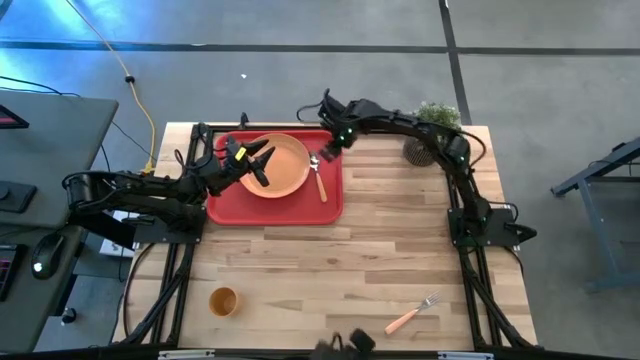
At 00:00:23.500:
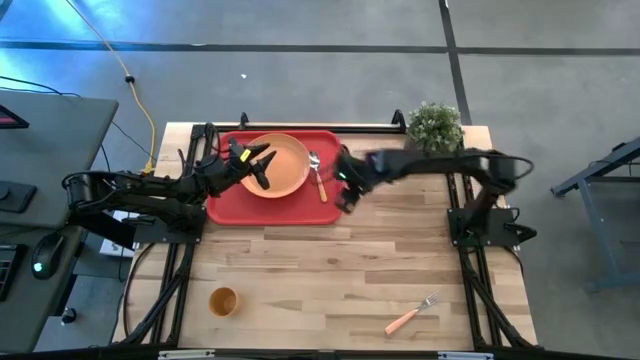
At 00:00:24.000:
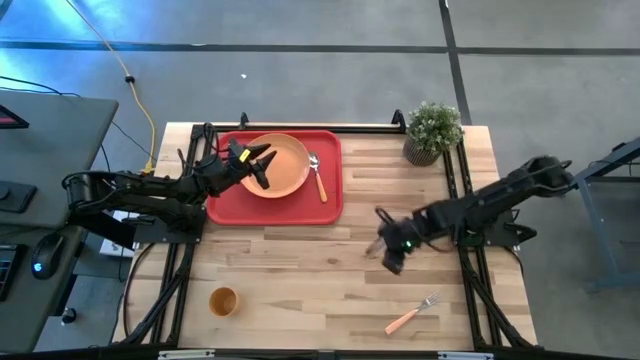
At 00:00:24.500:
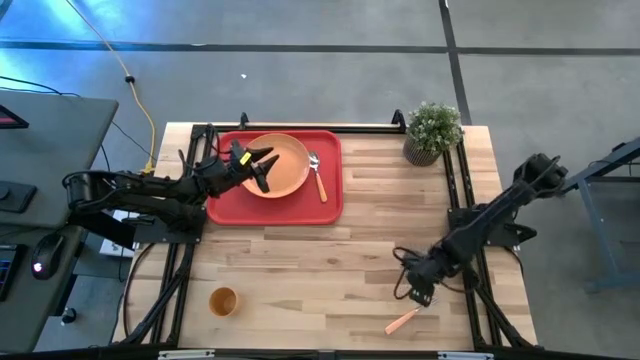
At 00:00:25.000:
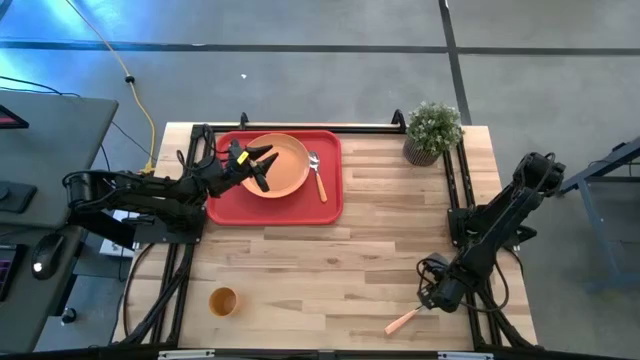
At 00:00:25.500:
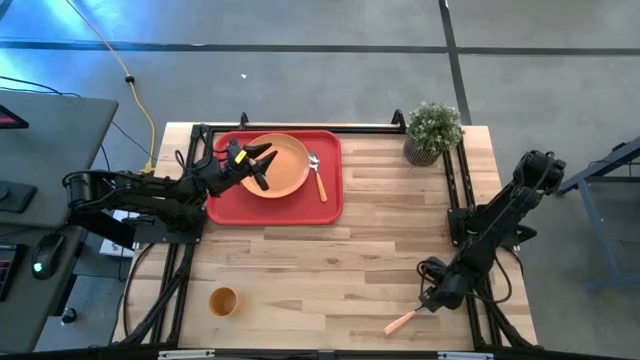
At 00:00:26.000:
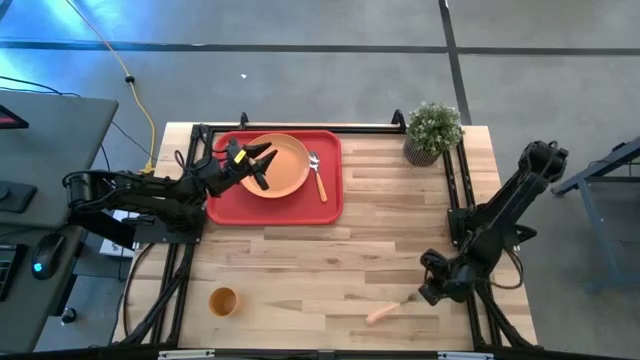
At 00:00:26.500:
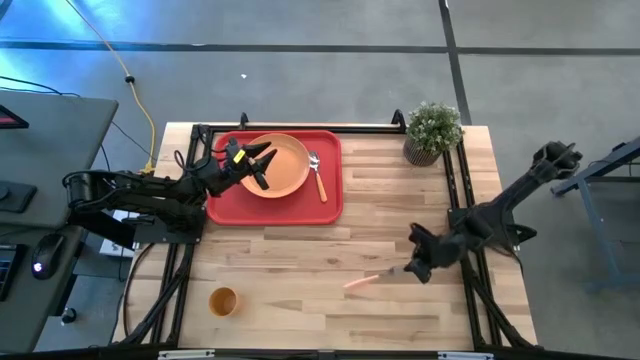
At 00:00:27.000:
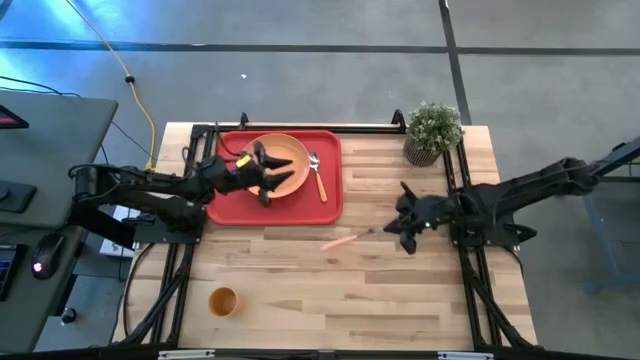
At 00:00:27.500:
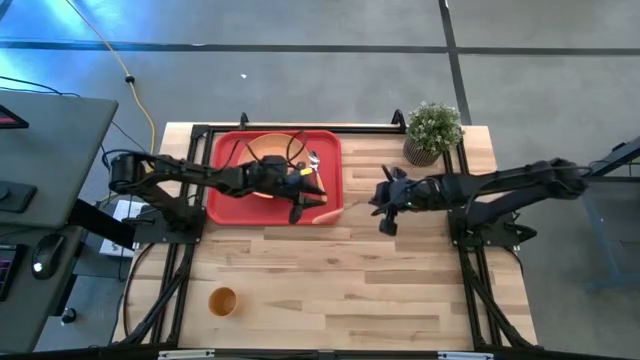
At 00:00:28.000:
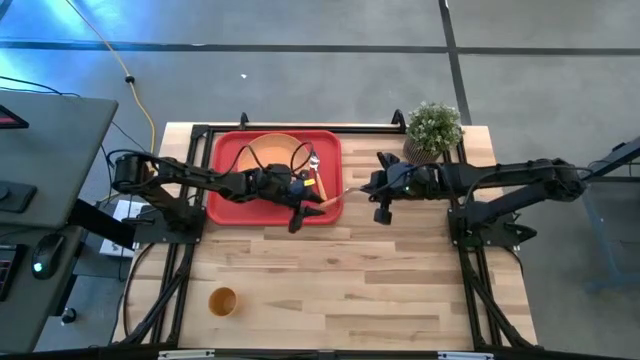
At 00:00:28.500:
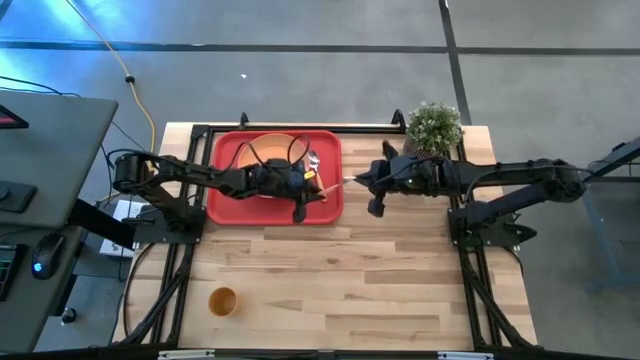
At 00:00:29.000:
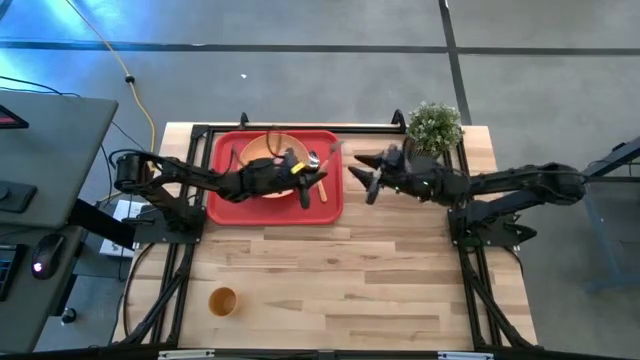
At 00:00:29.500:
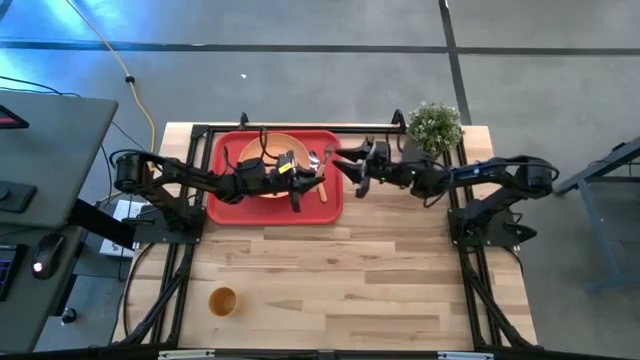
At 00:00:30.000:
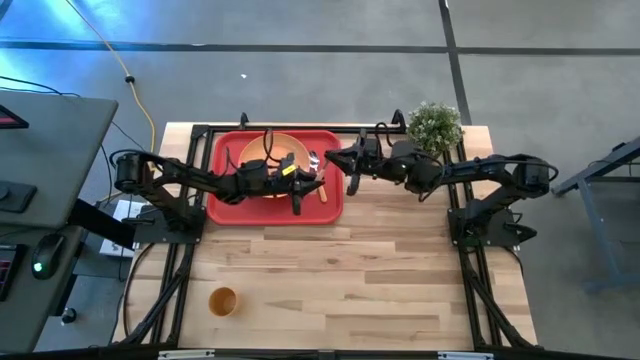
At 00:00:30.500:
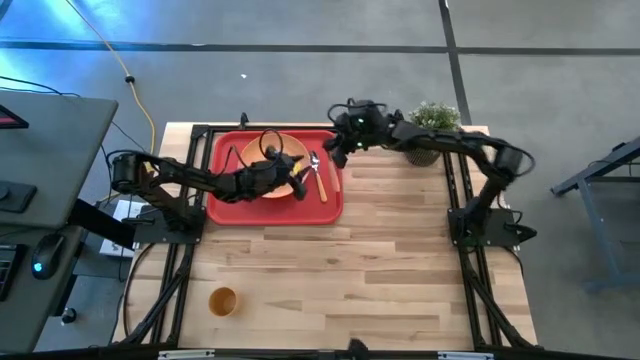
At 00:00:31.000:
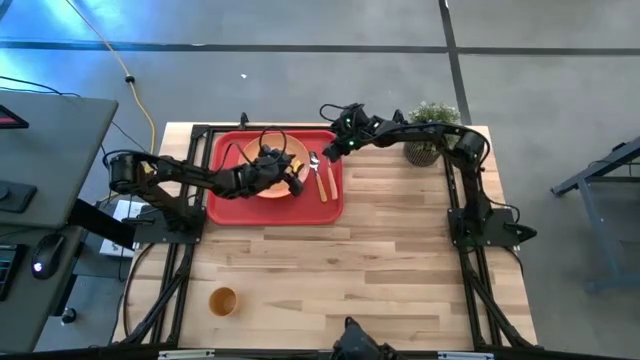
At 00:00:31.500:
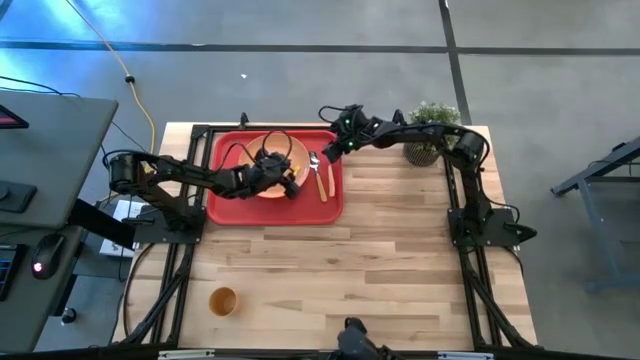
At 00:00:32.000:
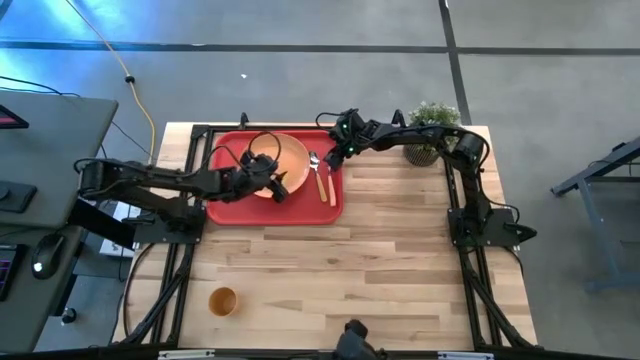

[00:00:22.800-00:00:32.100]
Task: Pick and place plate/cup/fork/spoon on tray
Put the orange fork on the red tray to the right of the yellow spoon

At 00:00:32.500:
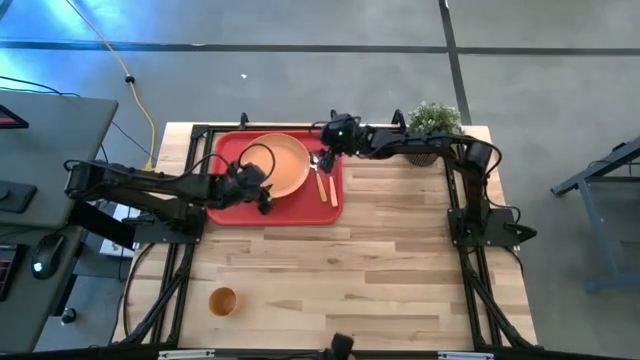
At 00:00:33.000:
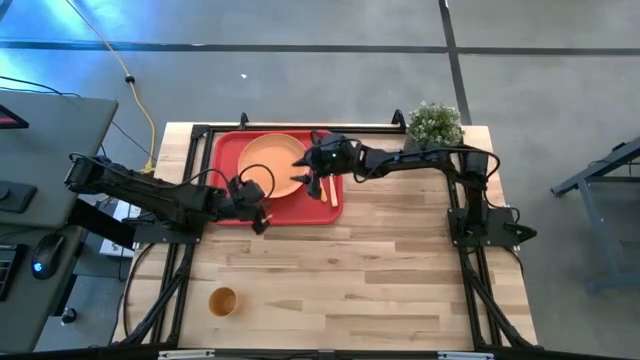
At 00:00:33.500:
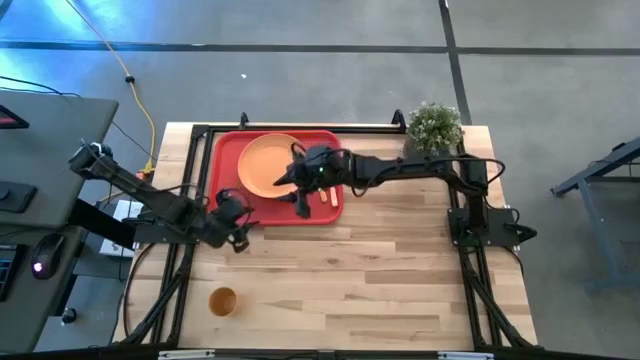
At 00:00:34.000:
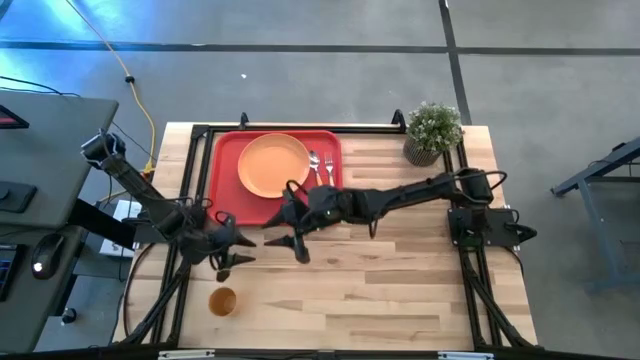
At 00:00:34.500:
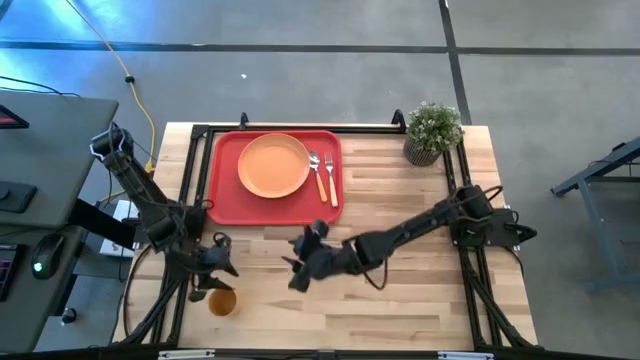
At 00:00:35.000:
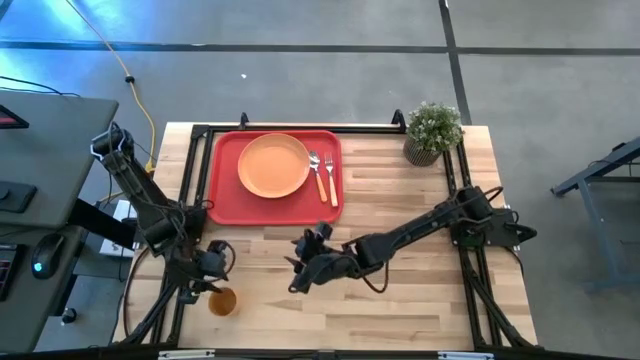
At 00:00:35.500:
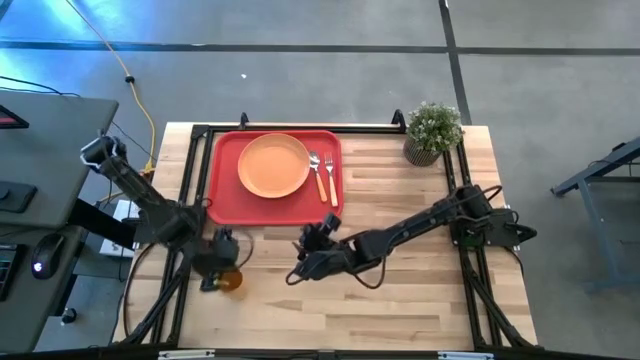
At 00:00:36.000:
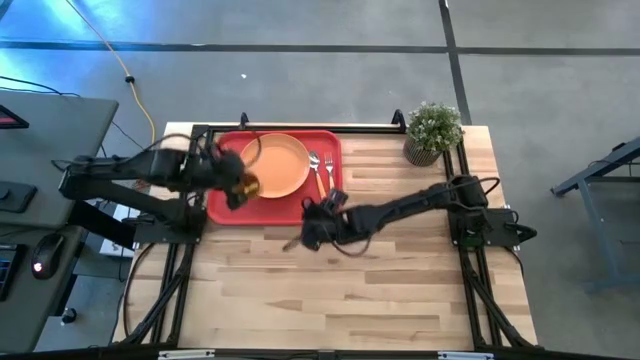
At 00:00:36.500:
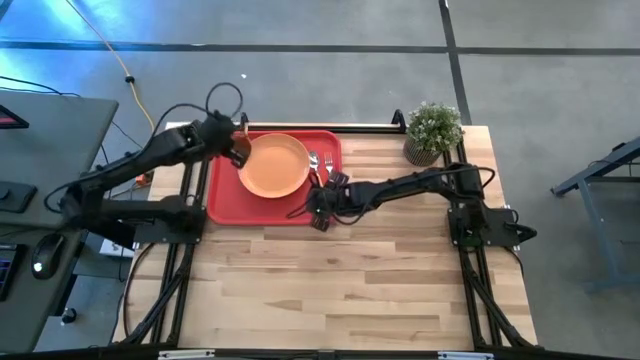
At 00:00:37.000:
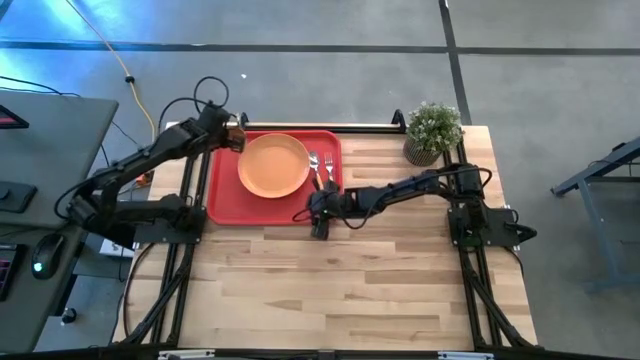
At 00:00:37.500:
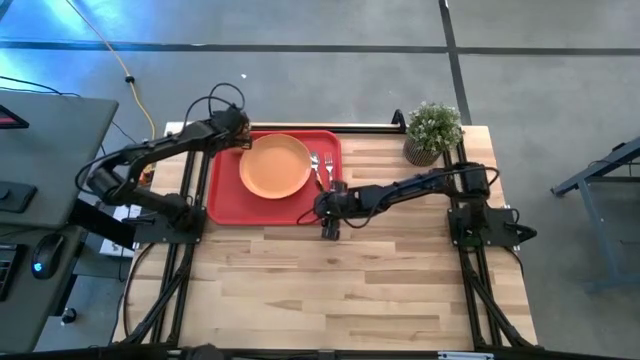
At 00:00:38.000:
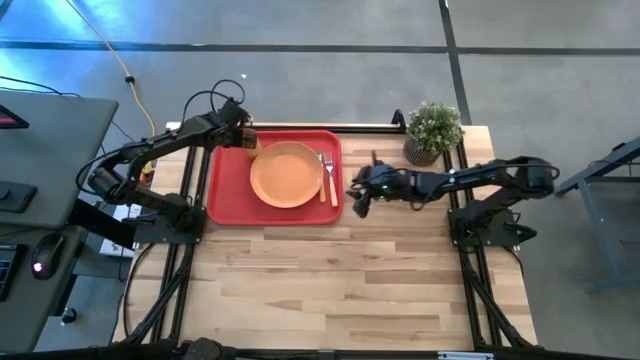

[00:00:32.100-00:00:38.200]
Put the brown cup on the red tray to the top left of the brown plate

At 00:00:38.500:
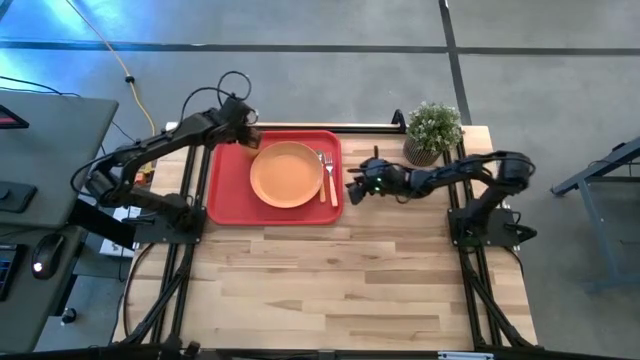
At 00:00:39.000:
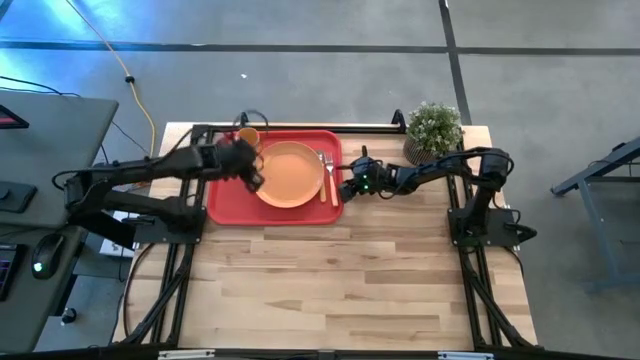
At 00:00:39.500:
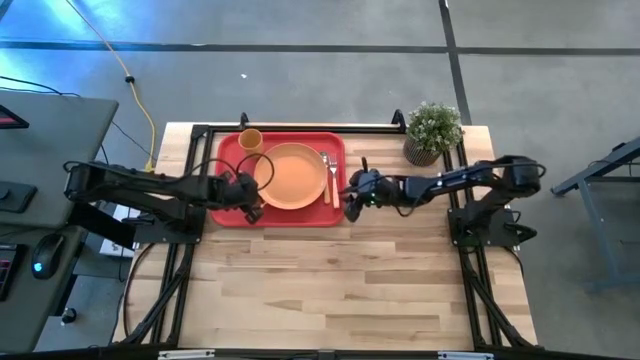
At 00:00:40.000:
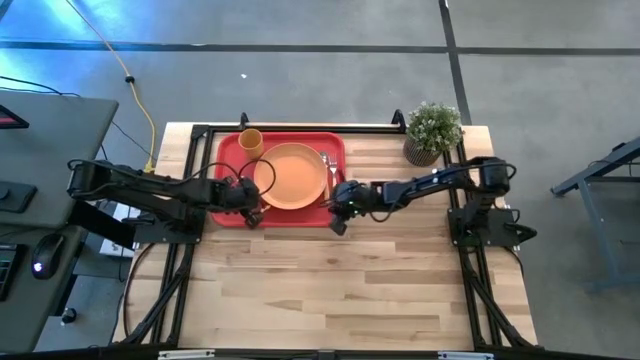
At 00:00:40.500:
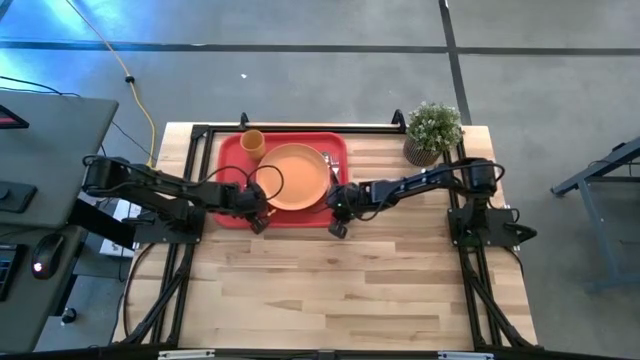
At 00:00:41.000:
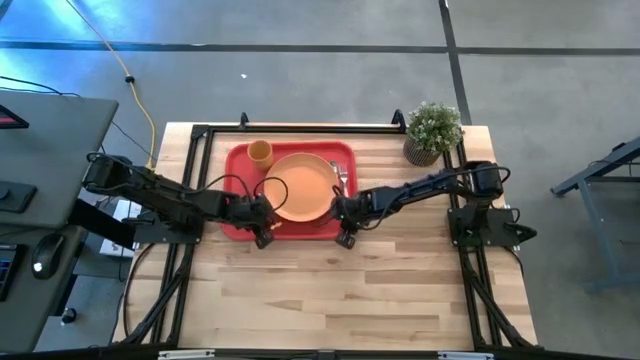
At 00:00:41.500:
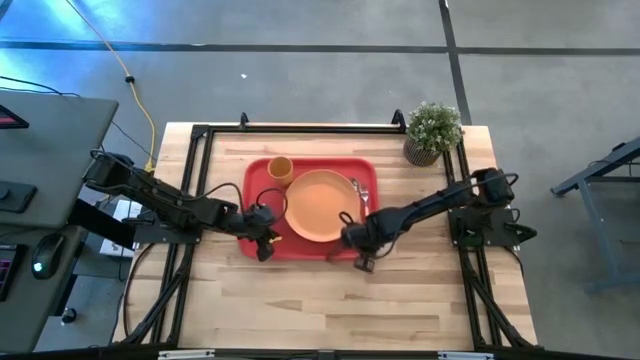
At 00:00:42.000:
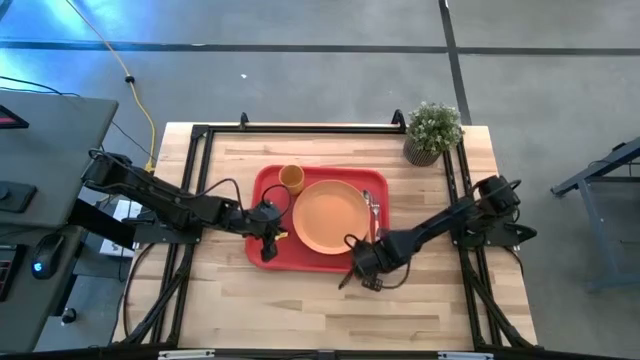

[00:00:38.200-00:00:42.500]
Move the red tray to the center of the table

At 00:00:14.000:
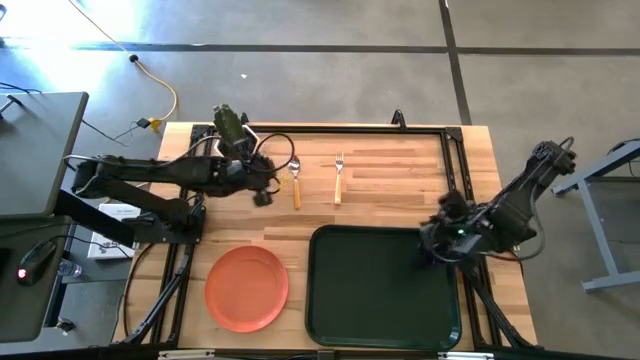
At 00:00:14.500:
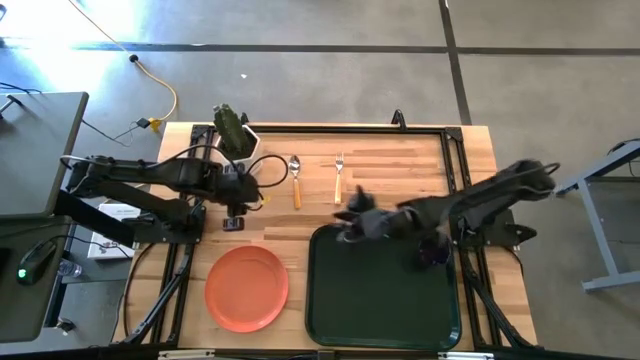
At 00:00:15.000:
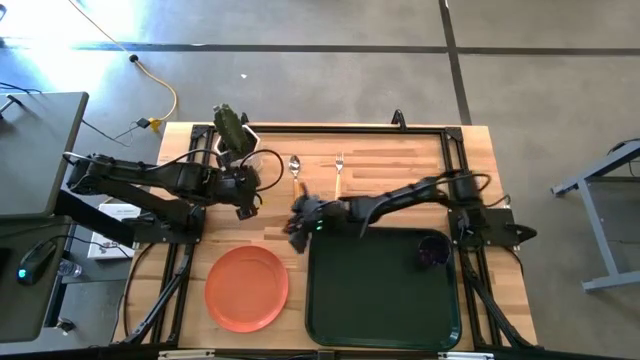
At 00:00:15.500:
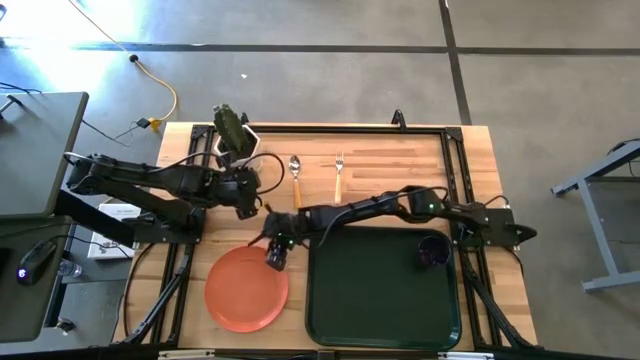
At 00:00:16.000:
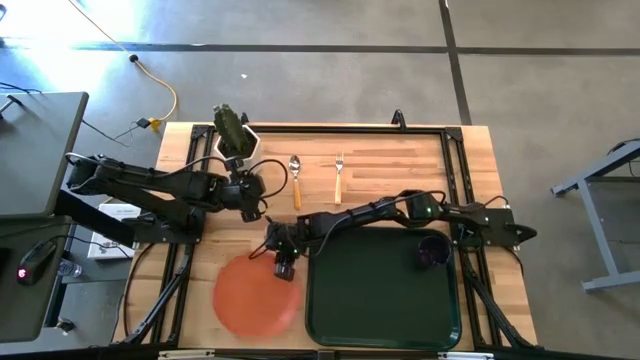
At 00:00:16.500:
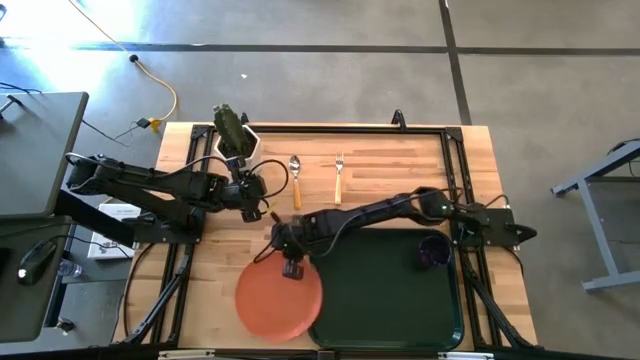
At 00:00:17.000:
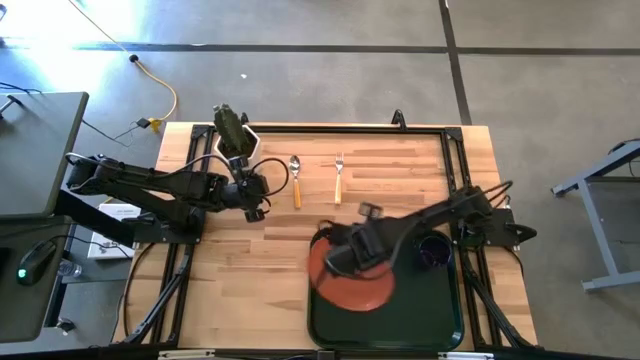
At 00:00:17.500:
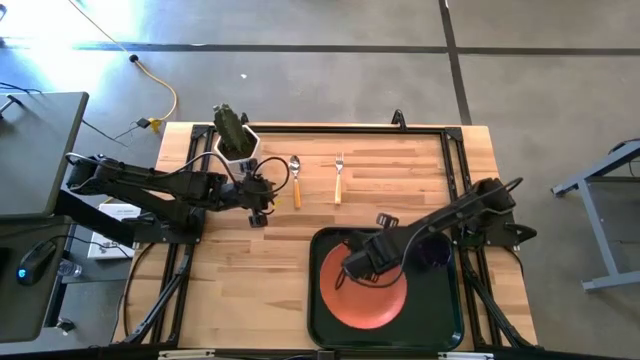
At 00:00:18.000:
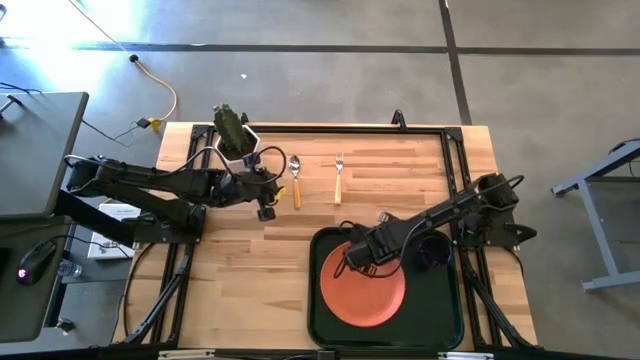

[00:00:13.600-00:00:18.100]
Task: Pick and place plate/cup/fork/spoon on tray
Put the orange plate on the left of the black serving tray
